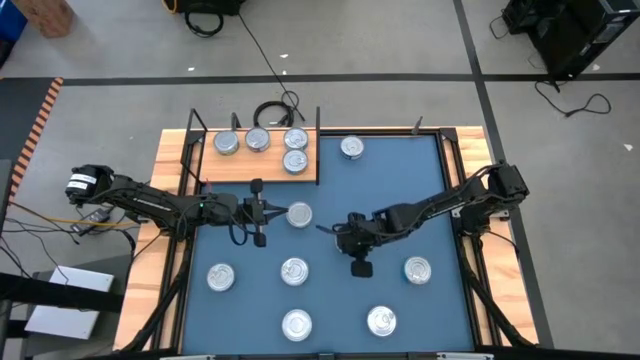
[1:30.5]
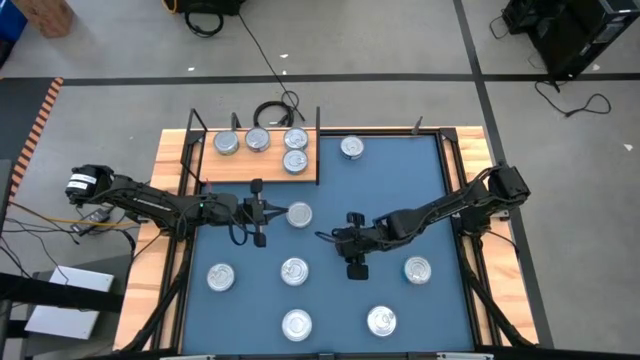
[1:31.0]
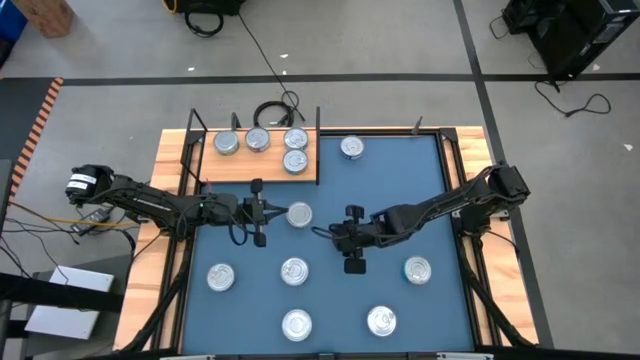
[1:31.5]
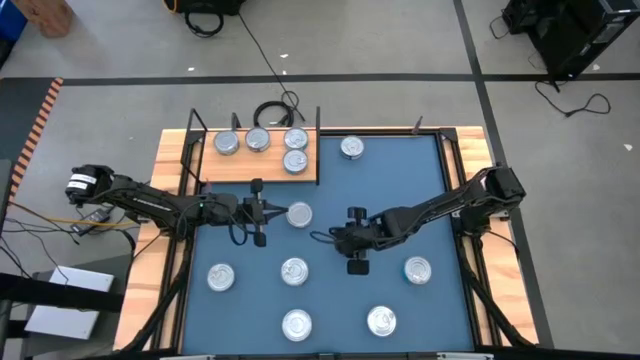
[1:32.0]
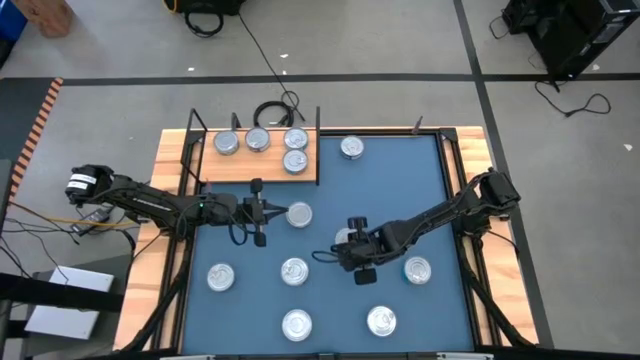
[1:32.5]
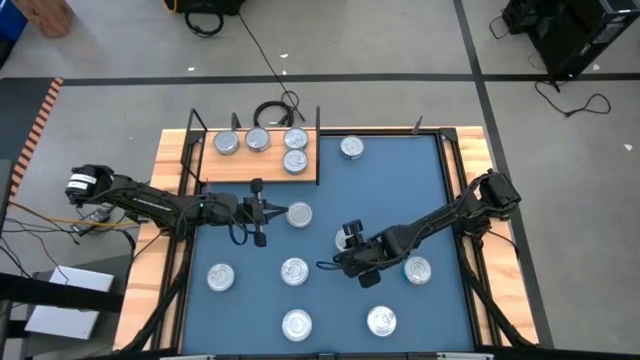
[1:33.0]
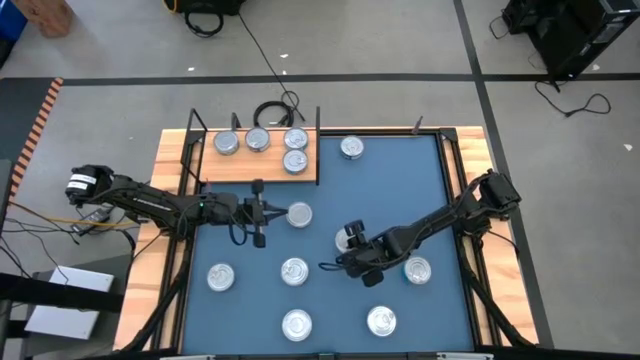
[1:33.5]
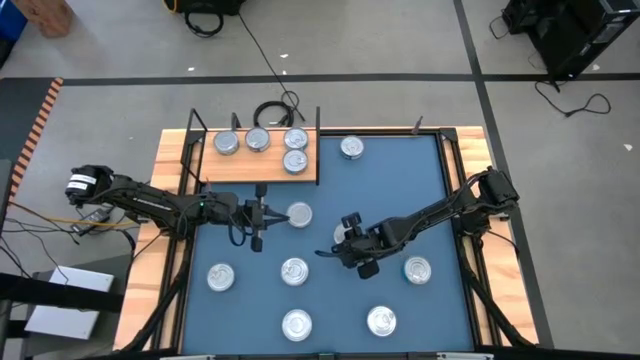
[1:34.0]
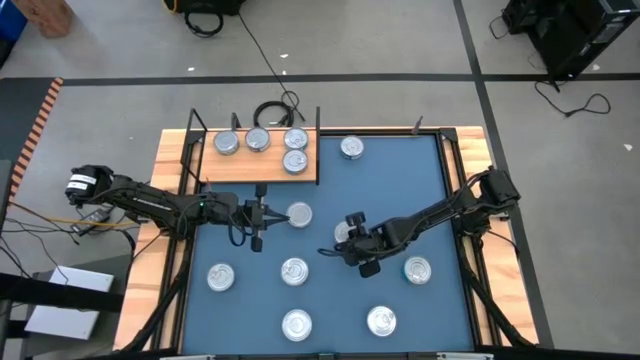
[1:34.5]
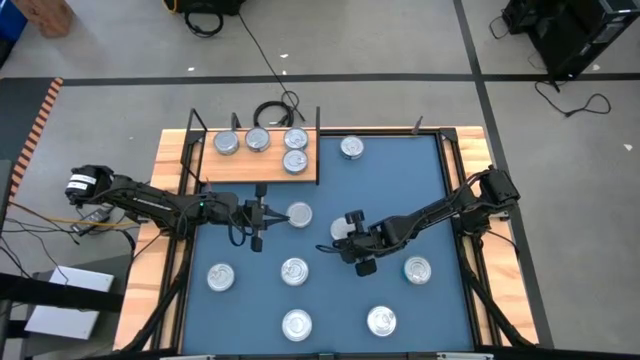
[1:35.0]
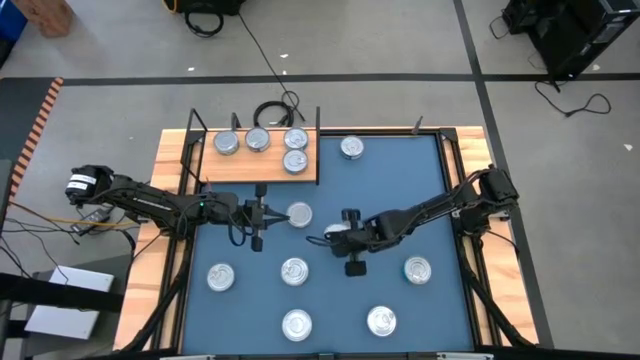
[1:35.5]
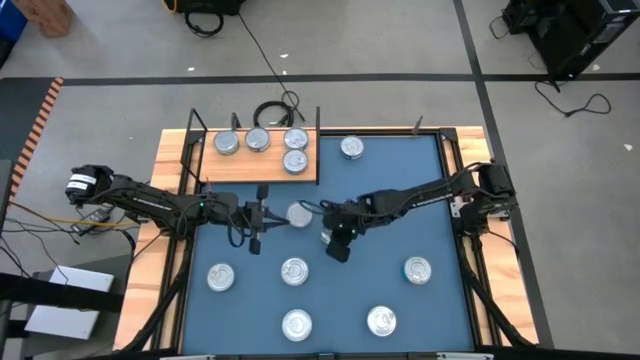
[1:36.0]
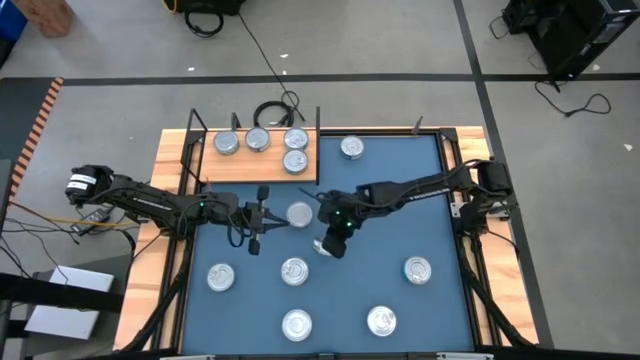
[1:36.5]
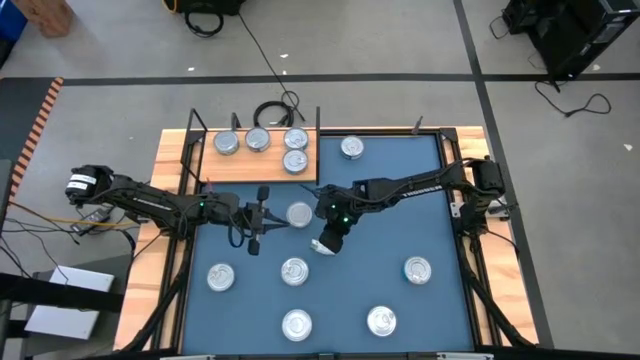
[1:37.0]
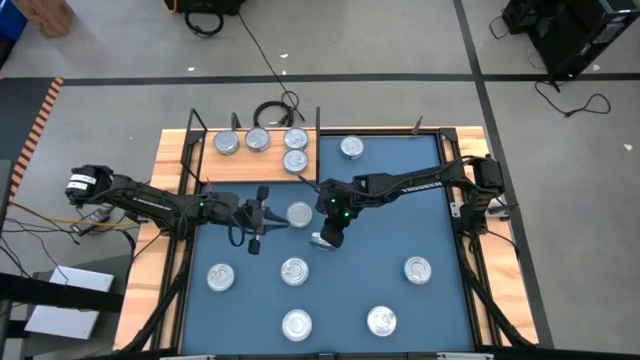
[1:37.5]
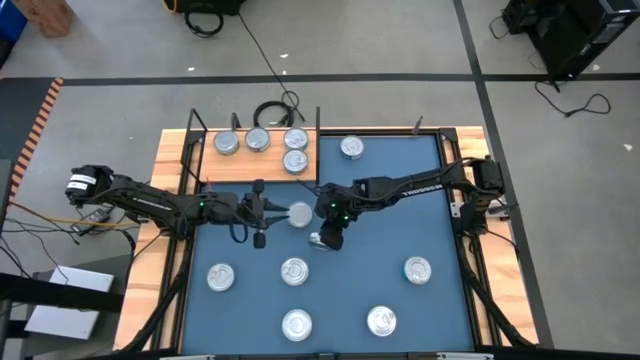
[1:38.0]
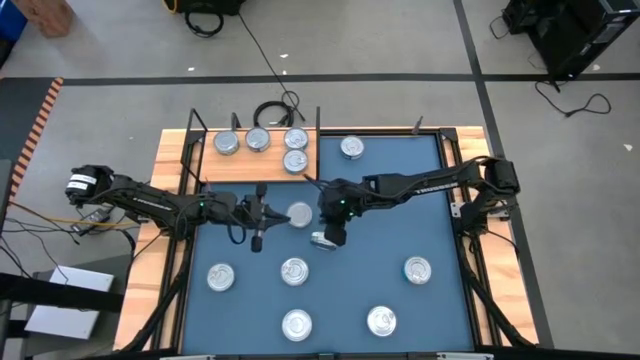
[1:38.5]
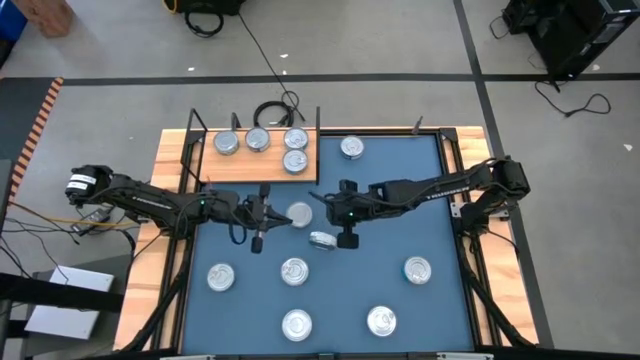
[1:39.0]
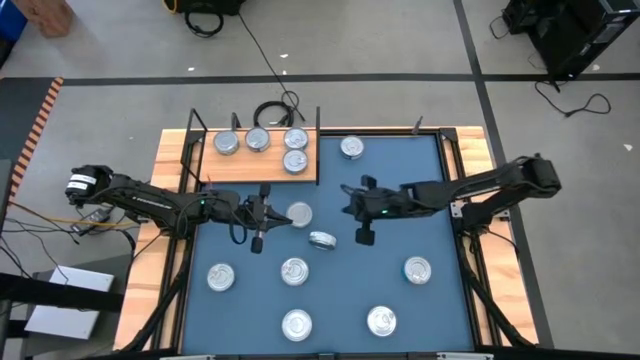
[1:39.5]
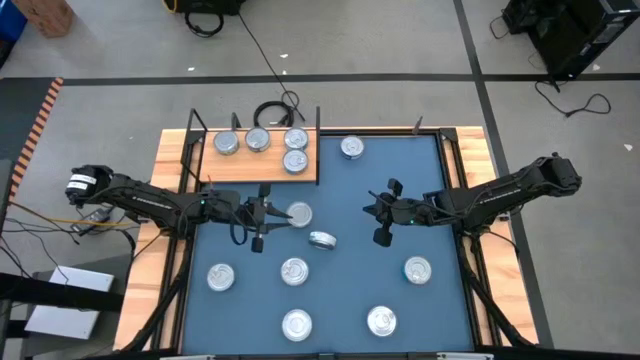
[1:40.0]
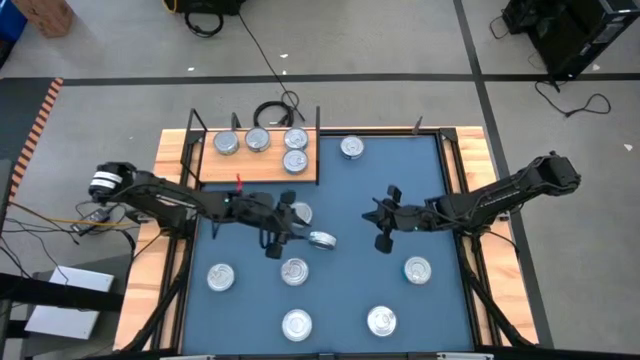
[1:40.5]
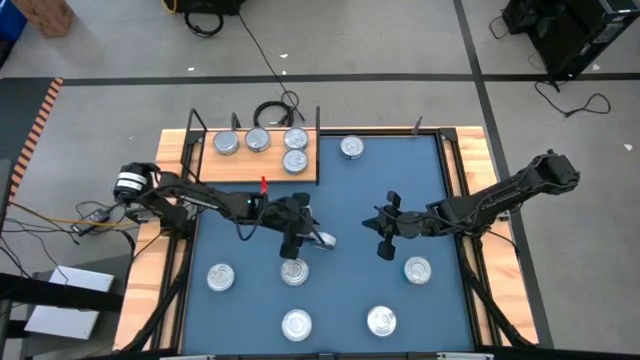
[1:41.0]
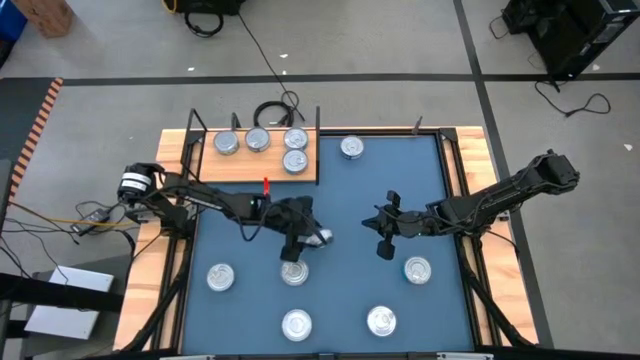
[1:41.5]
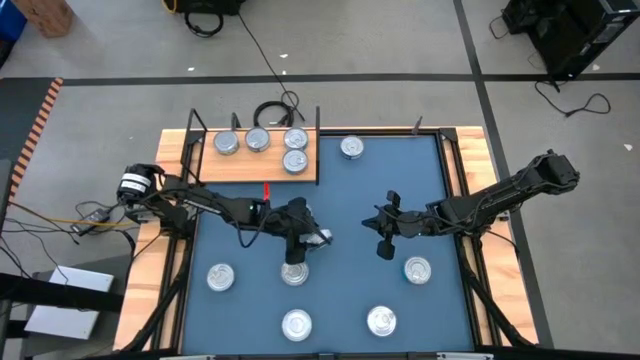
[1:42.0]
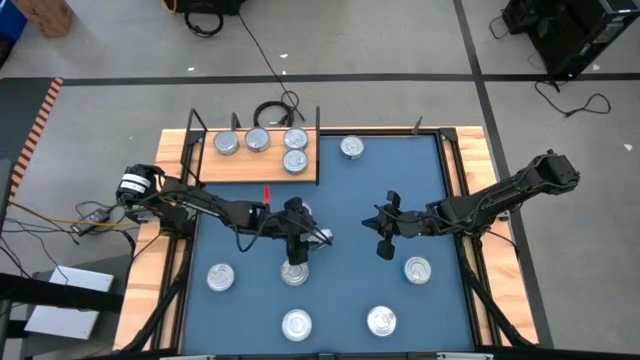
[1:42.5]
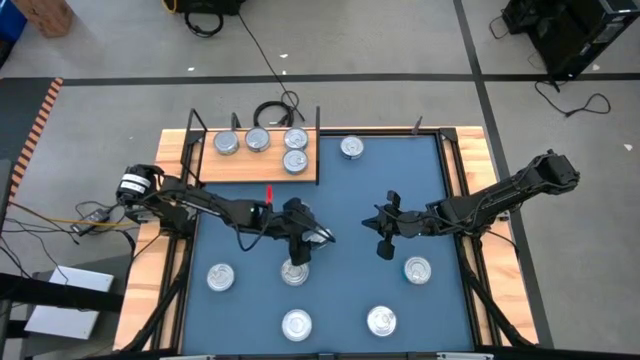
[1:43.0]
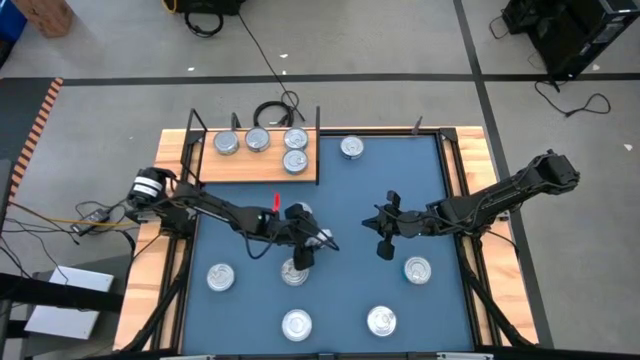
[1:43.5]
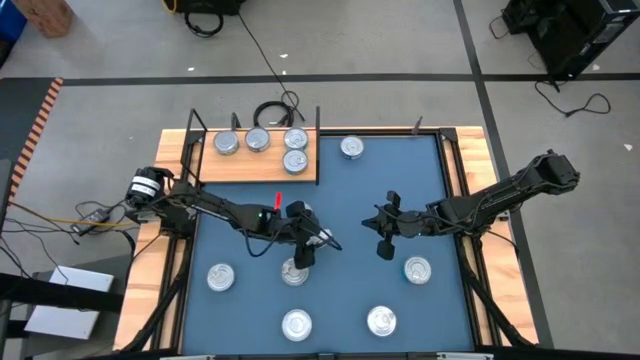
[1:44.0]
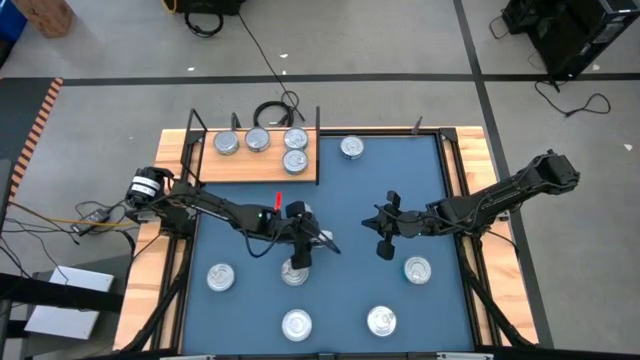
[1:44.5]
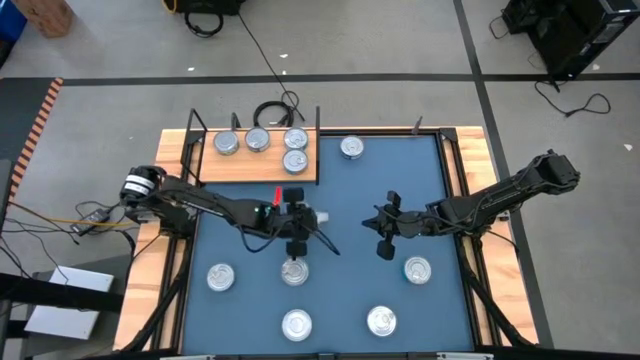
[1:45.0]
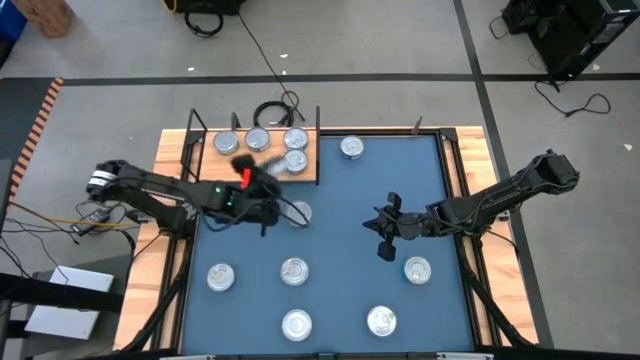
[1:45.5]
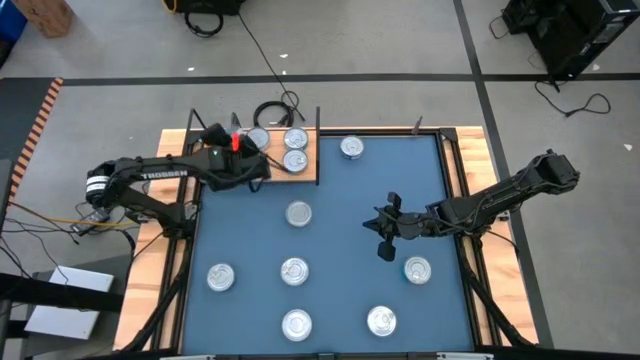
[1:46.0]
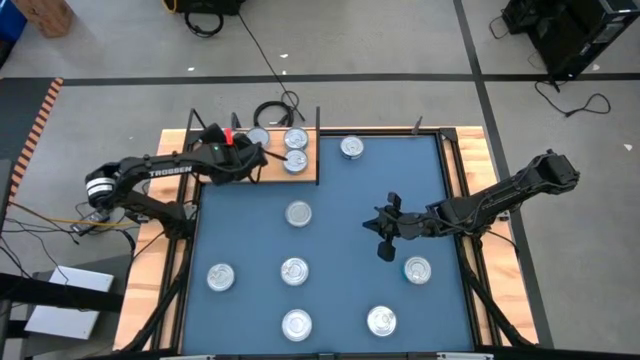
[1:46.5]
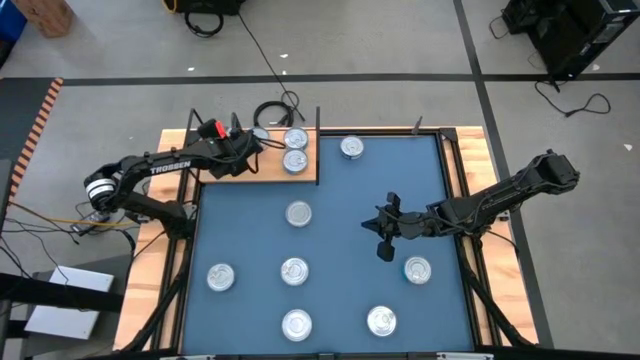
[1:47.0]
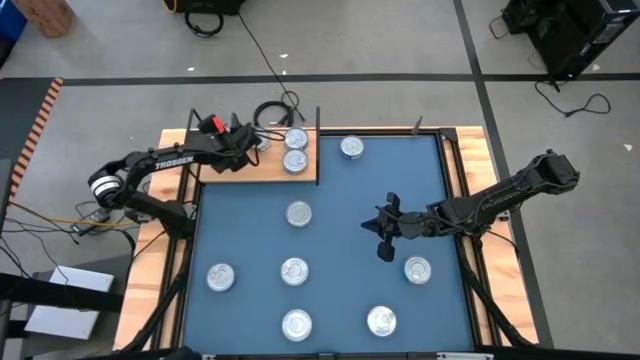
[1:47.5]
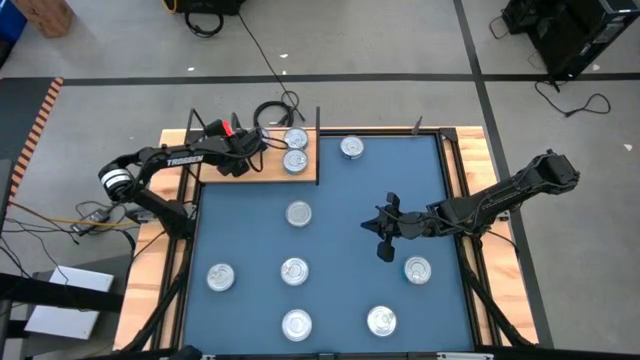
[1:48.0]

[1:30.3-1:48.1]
Task: Stack canned seafood by type on shelf
Stack the green tuna can on top of the green tuna can on the shelf
